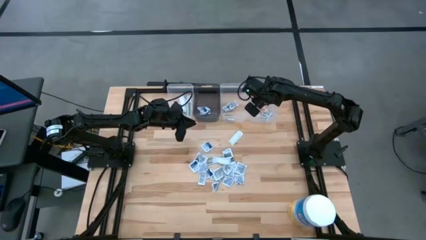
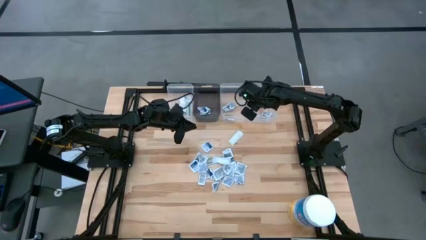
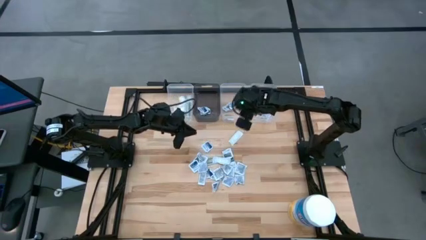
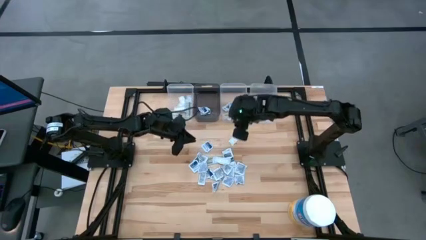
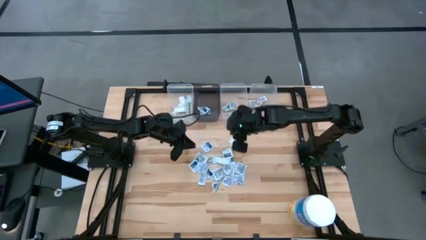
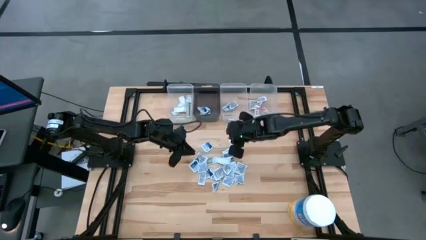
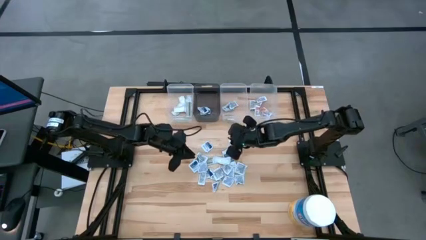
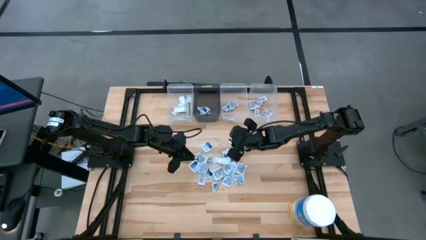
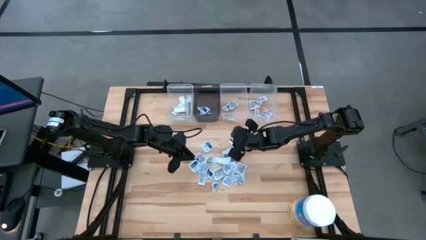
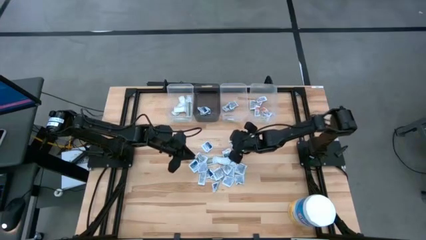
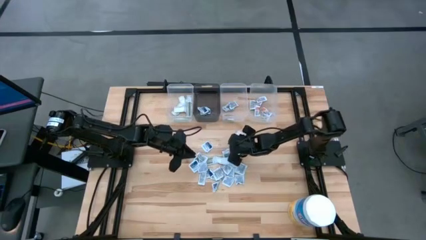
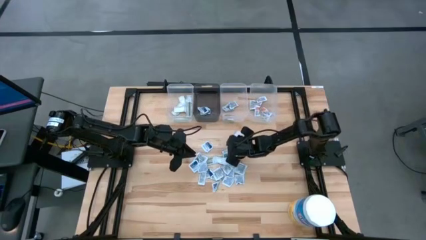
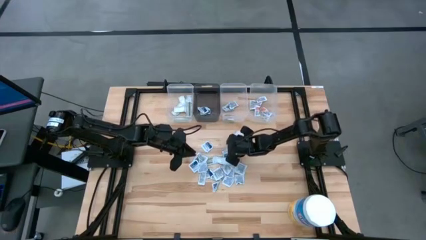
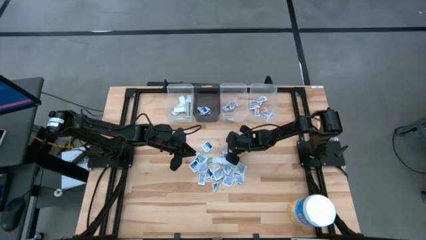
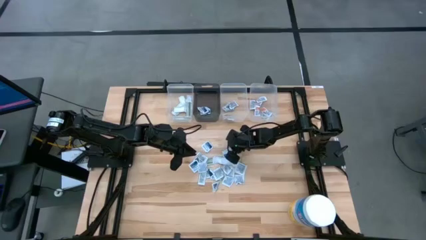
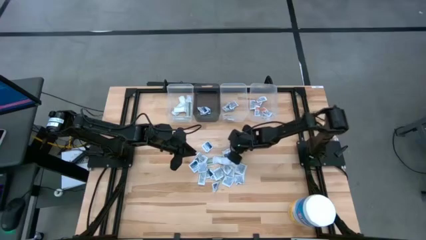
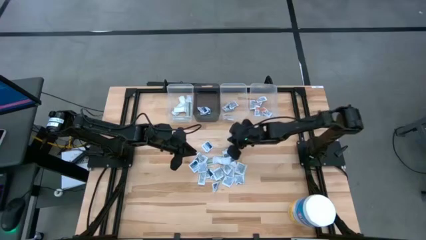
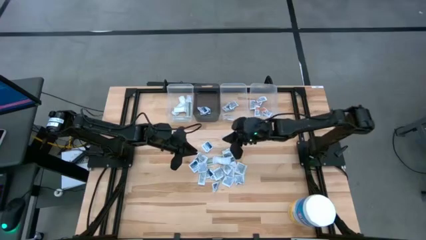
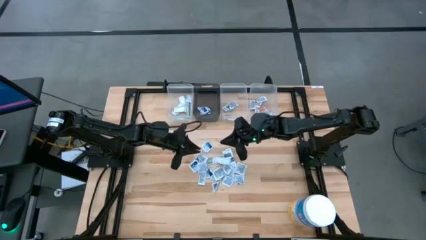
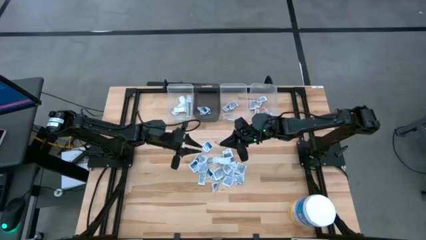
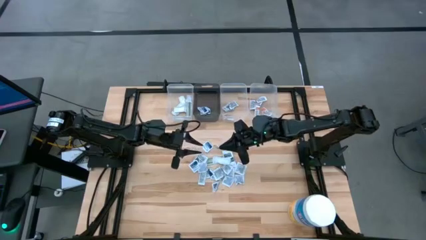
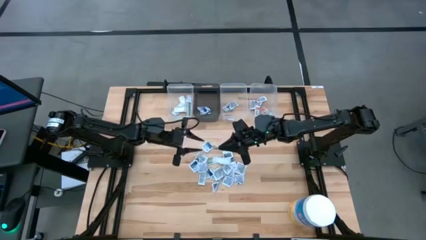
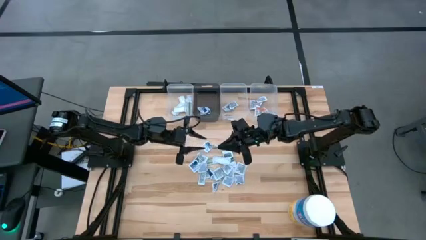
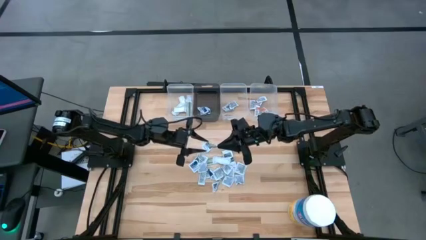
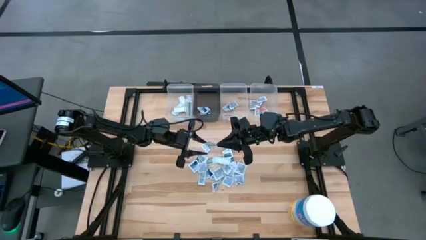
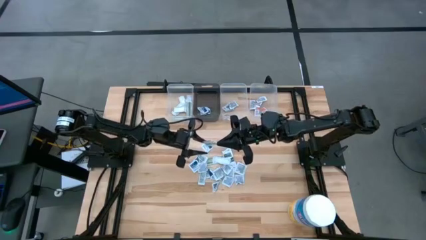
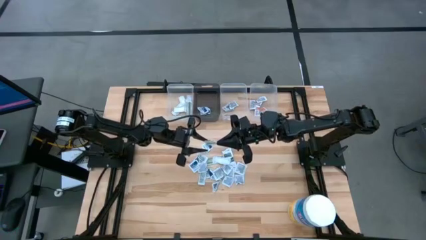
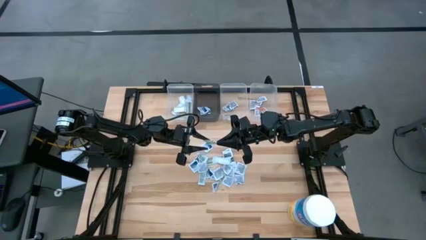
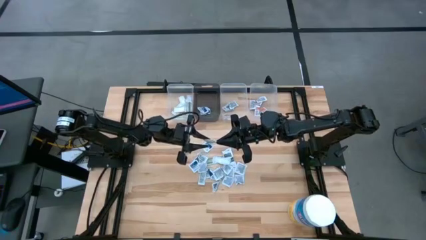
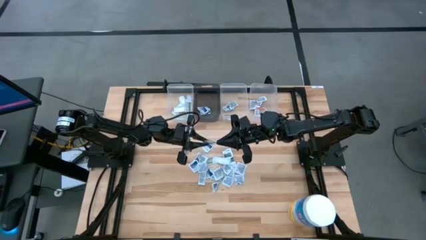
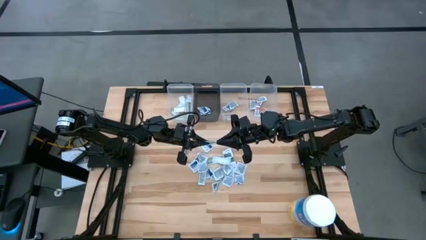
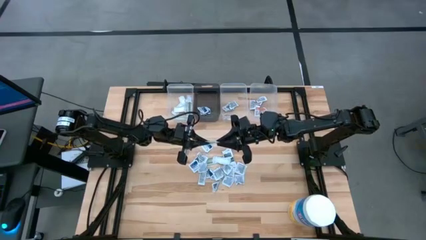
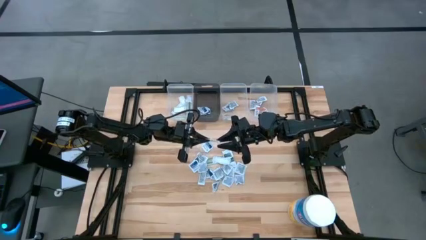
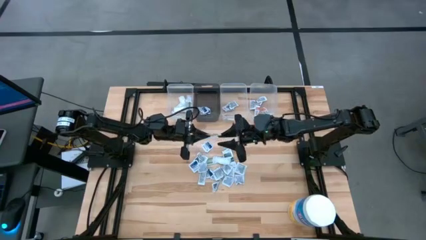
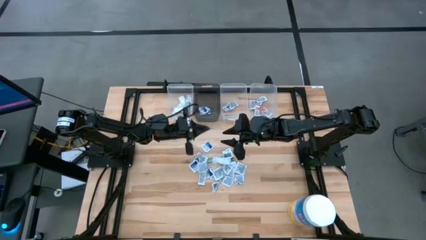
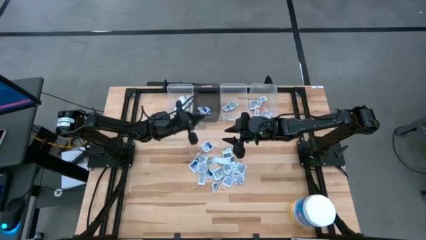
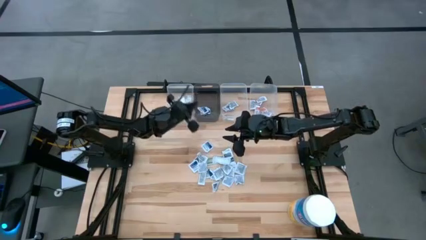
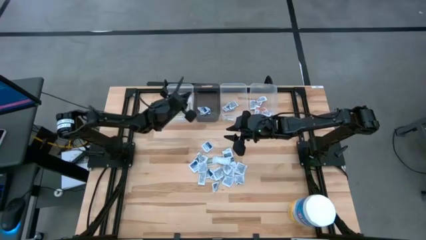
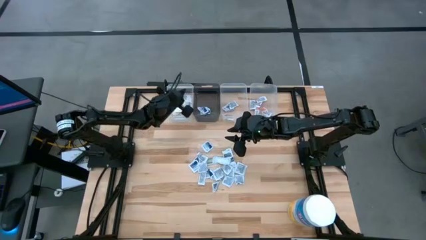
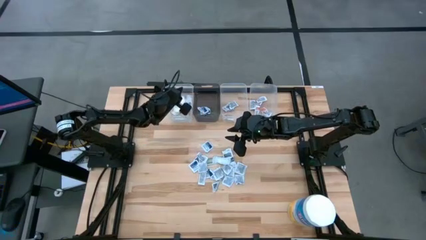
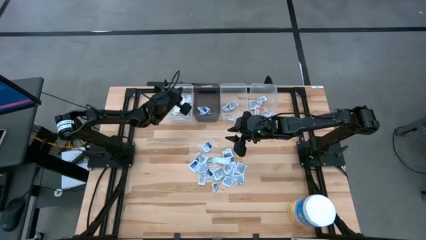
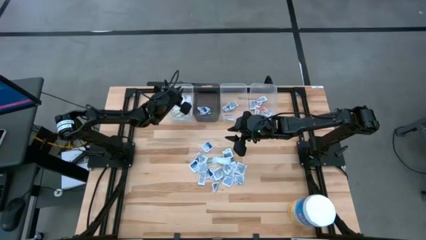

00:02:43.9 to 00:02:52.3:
Task: Pick & Place First Aid Supplies
Put the bandage into the left transparent bin

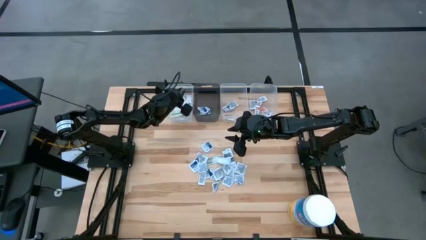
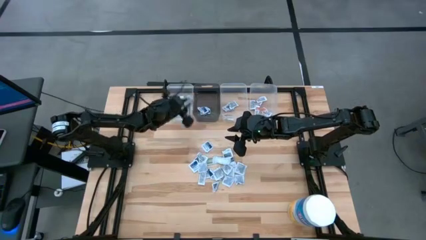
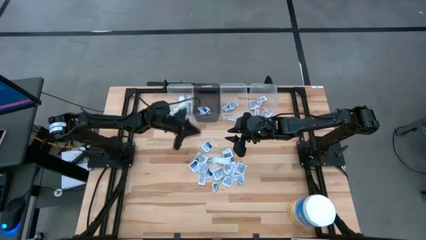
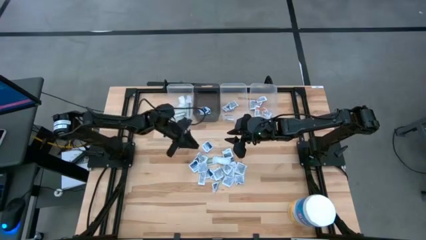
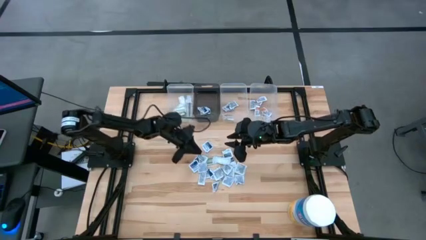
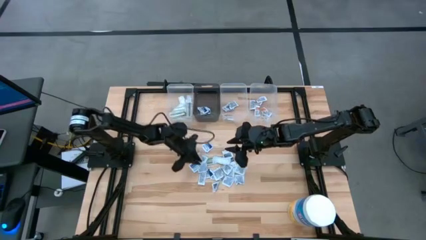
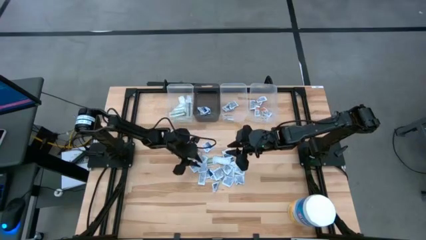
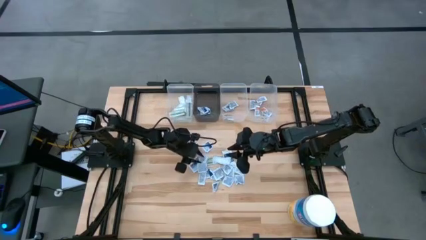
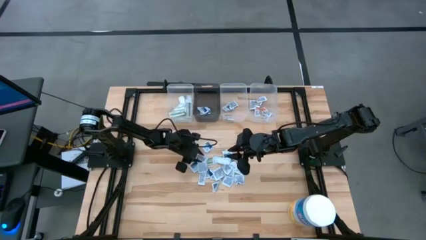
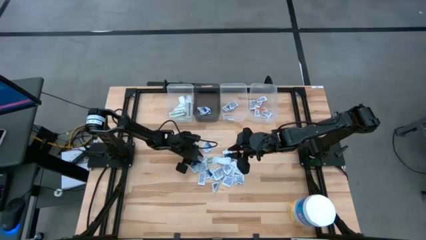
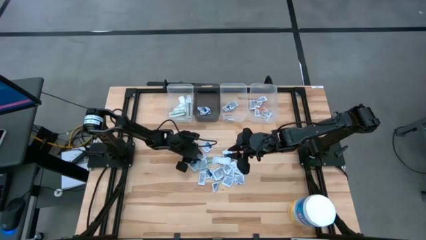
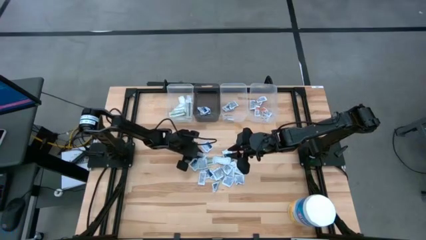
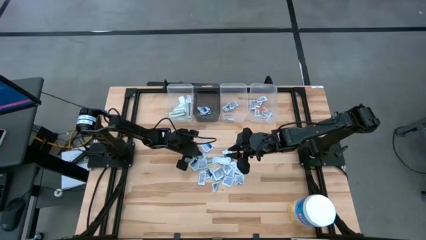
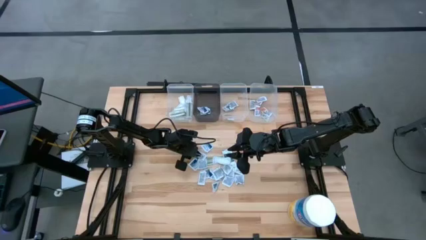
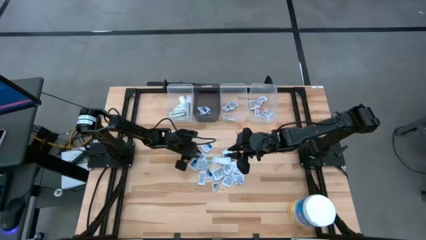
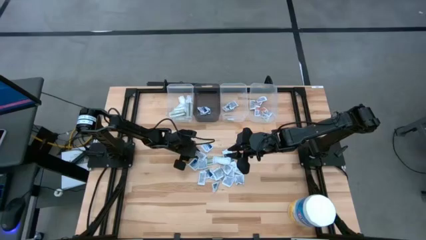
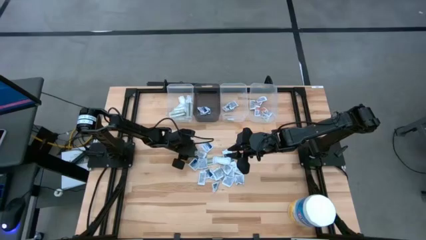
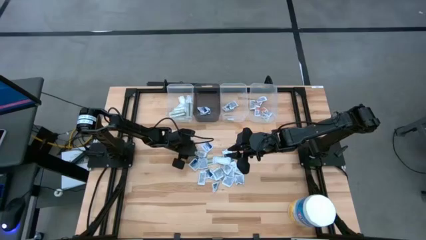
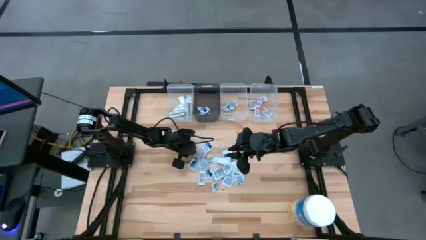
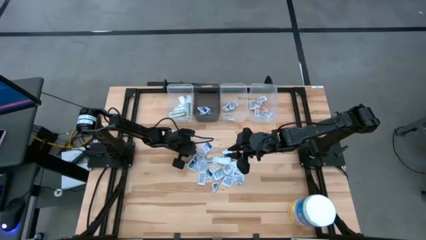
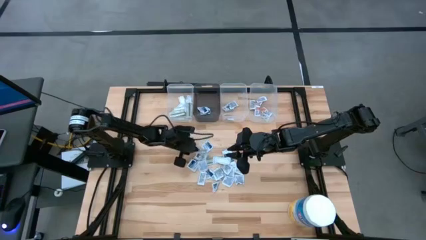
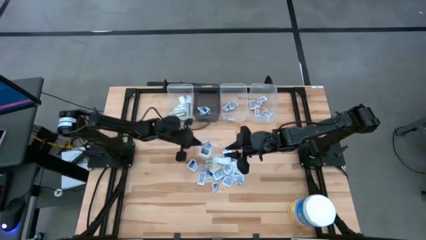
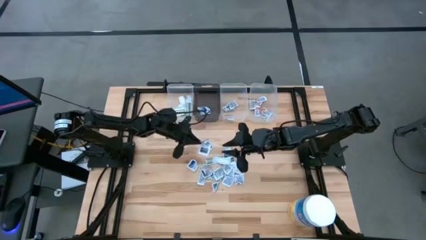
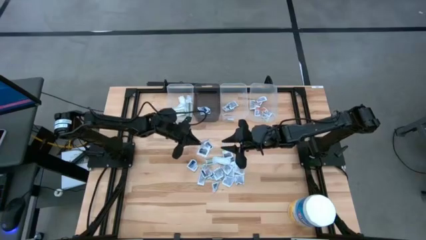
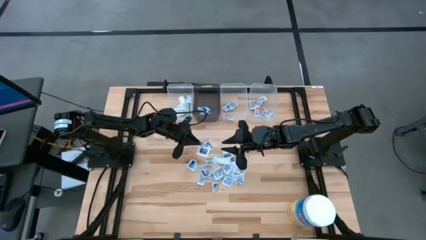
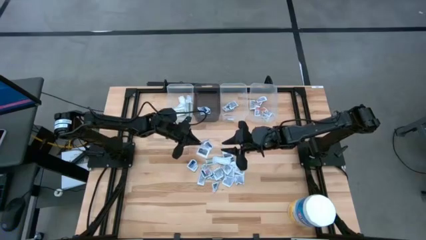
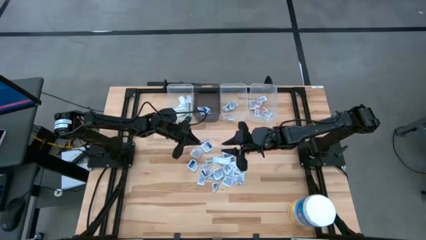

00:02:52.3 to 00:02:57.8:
Put the ointment pack into the right transparent bin

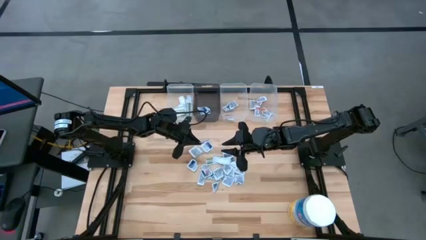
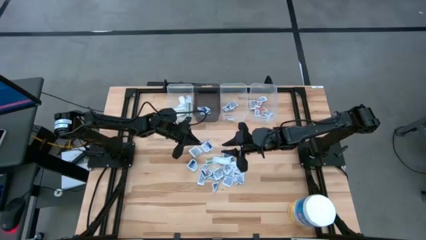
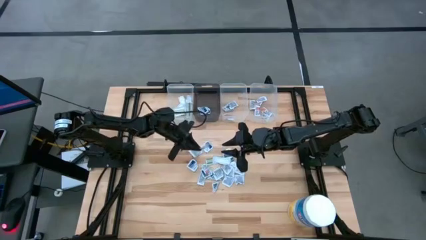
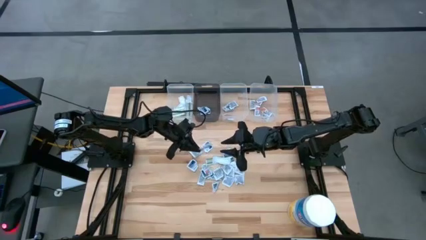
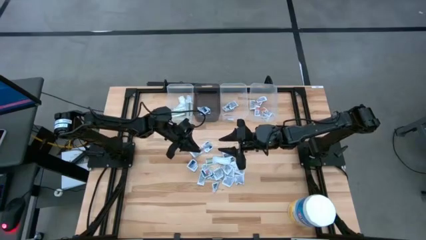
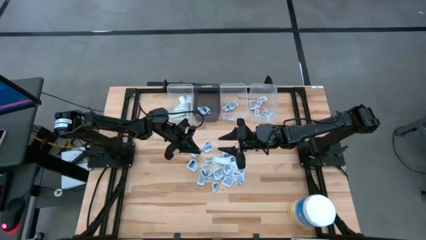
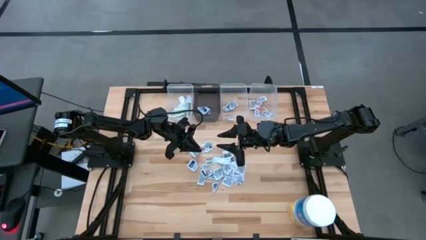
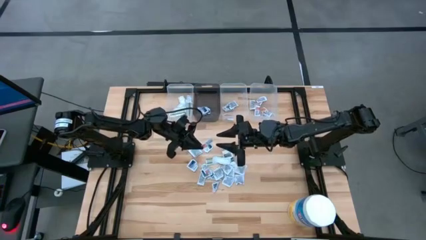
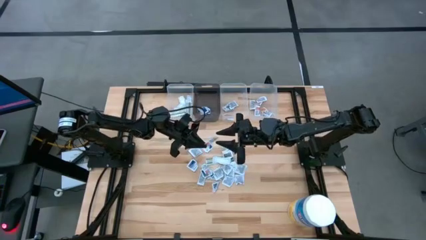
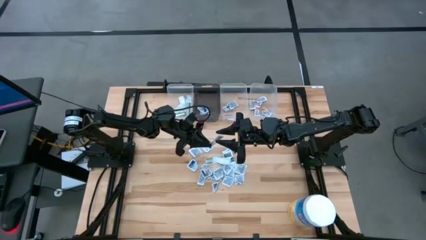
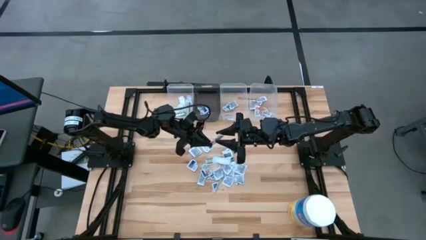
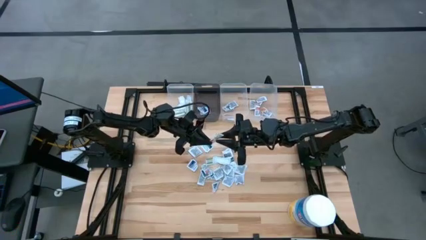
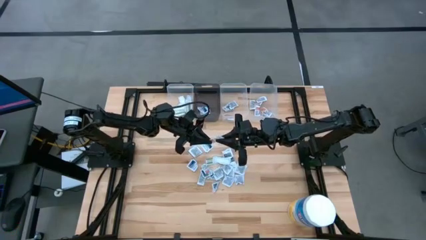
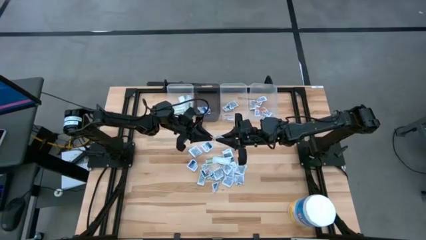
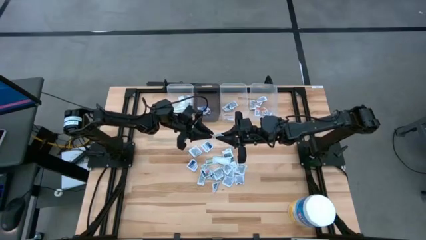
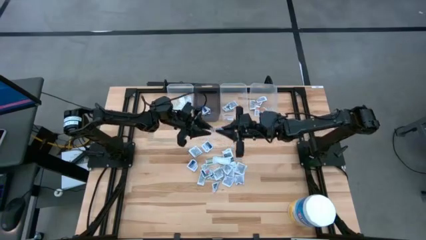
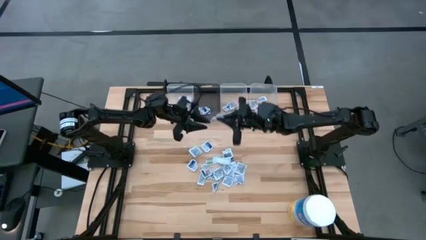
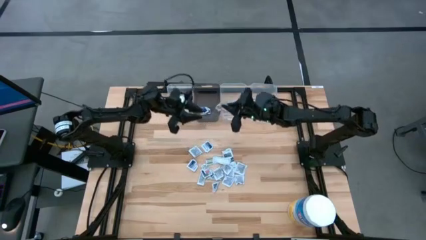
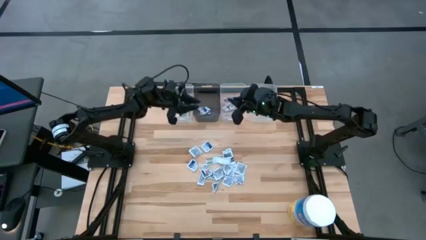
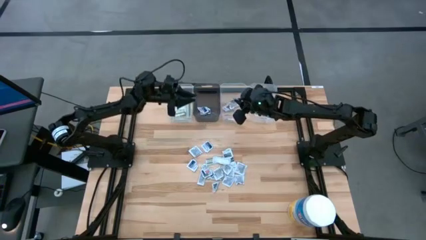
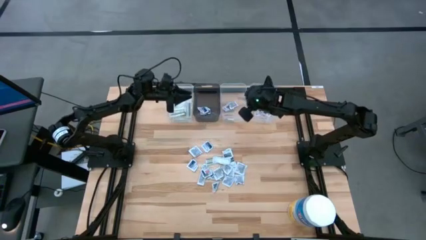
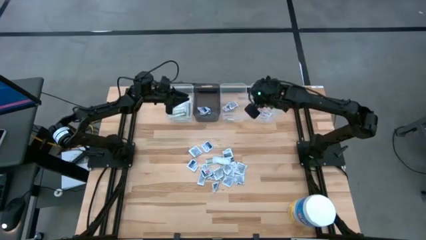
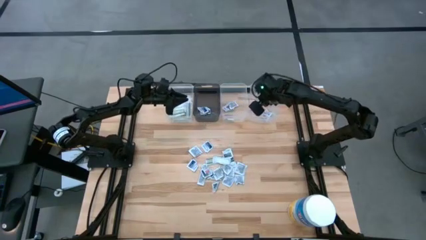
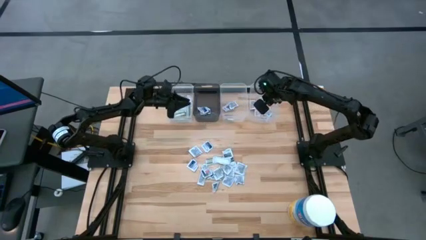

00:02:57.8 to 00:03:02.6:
Put the ointment pack into the right transparent bin
